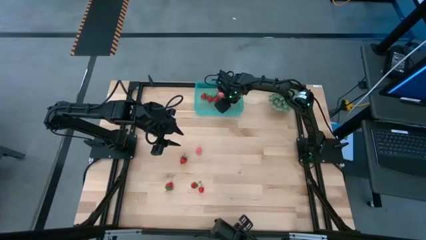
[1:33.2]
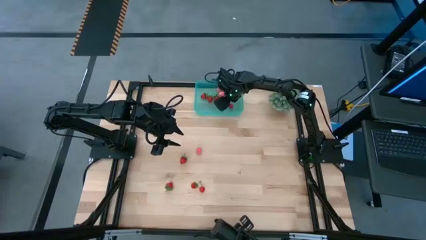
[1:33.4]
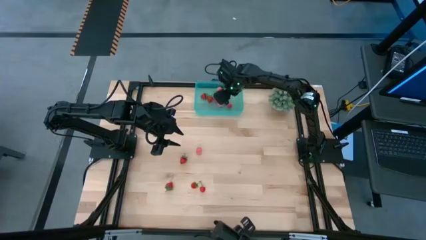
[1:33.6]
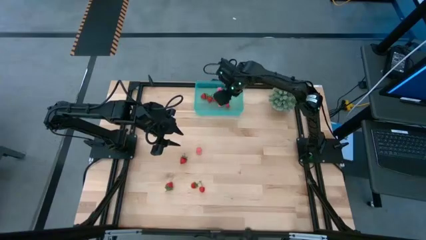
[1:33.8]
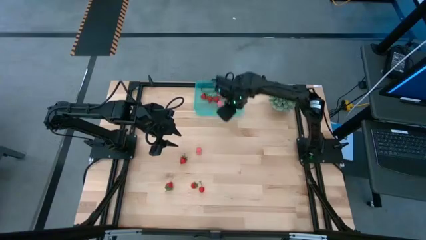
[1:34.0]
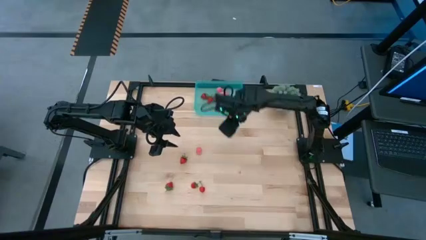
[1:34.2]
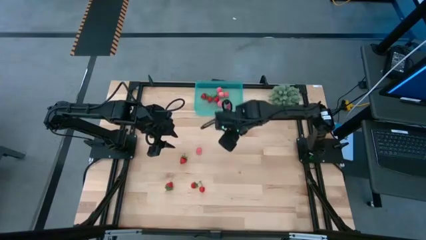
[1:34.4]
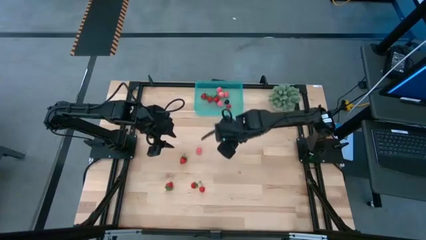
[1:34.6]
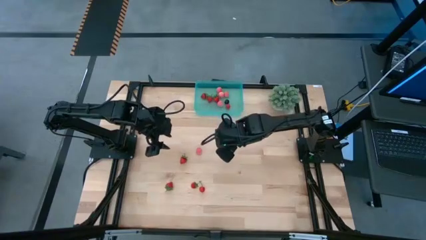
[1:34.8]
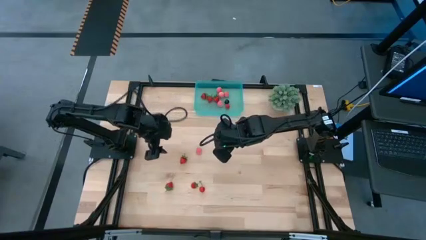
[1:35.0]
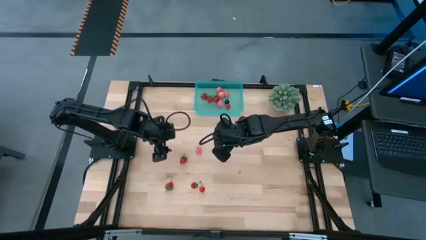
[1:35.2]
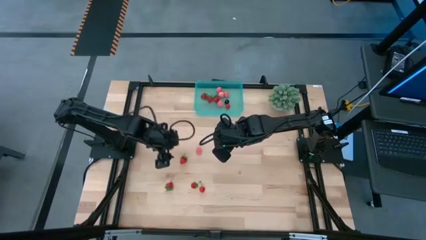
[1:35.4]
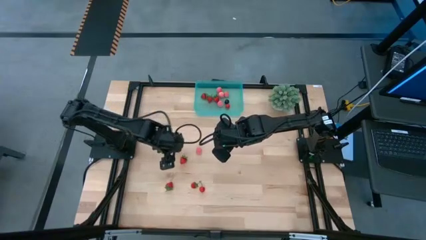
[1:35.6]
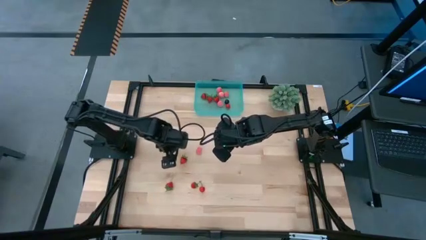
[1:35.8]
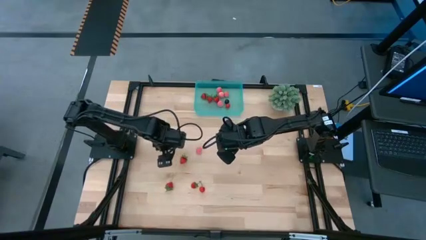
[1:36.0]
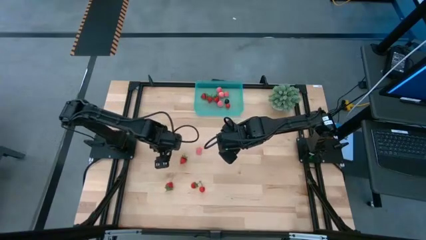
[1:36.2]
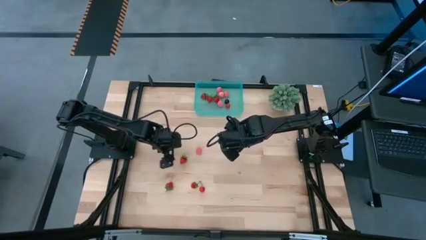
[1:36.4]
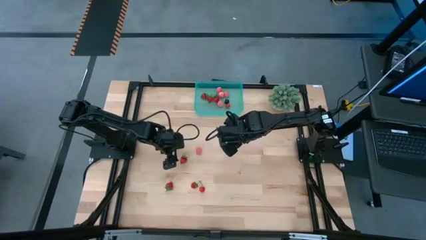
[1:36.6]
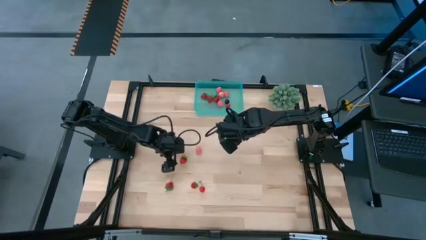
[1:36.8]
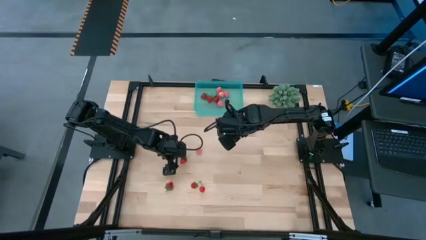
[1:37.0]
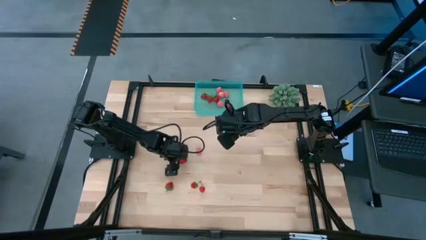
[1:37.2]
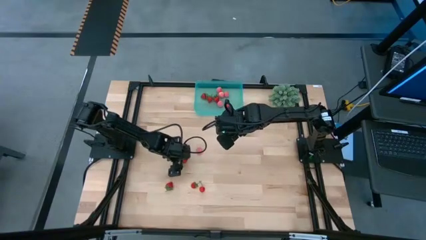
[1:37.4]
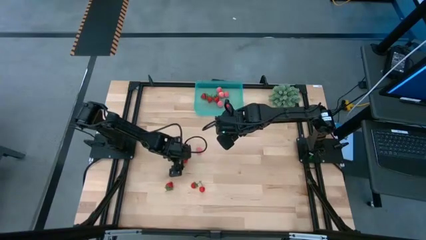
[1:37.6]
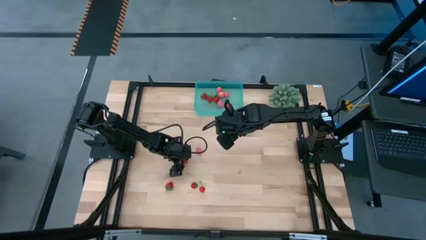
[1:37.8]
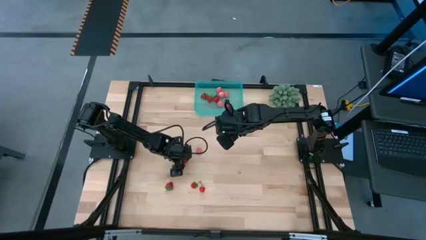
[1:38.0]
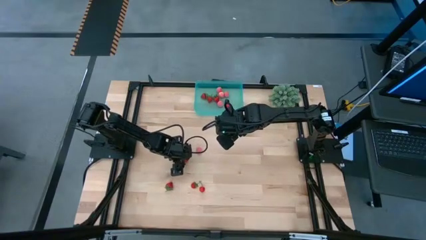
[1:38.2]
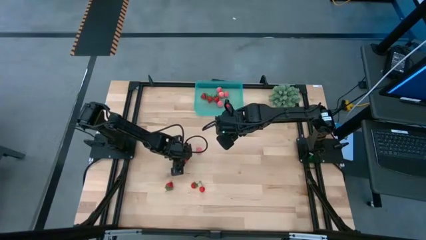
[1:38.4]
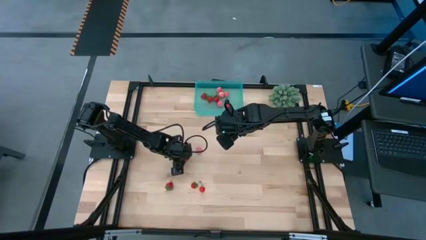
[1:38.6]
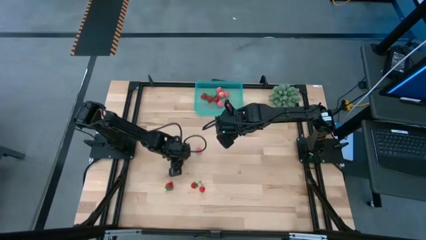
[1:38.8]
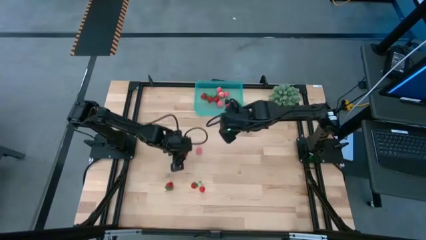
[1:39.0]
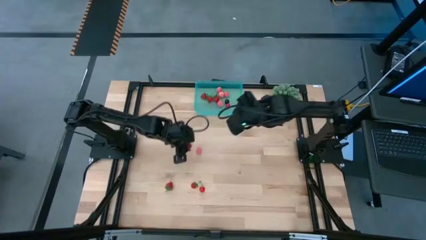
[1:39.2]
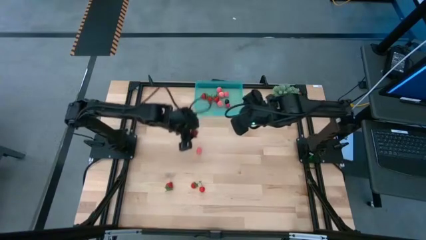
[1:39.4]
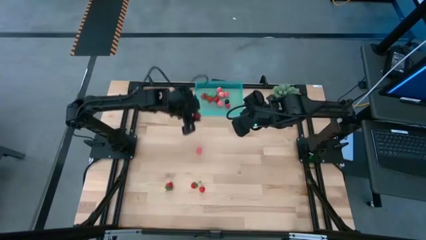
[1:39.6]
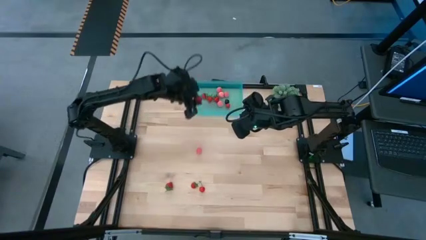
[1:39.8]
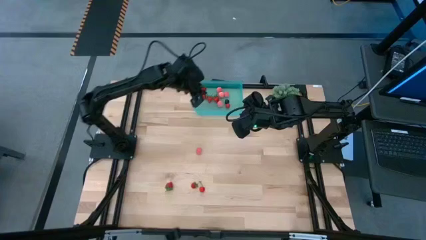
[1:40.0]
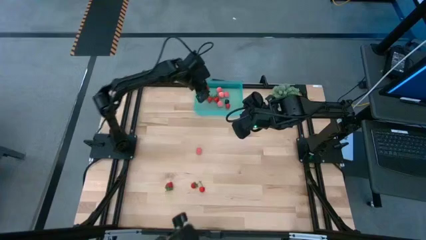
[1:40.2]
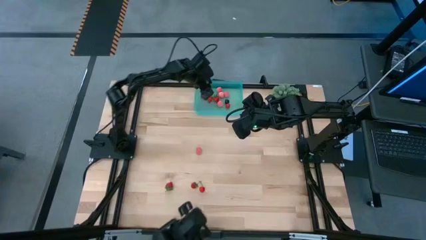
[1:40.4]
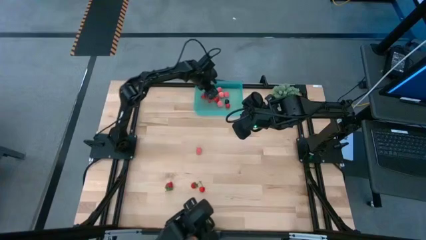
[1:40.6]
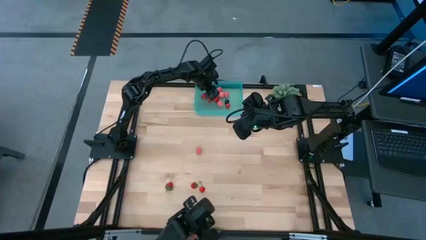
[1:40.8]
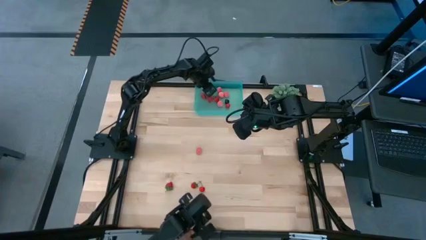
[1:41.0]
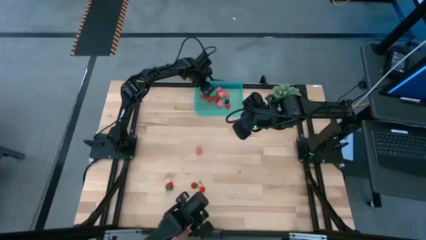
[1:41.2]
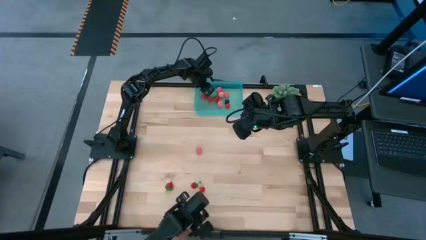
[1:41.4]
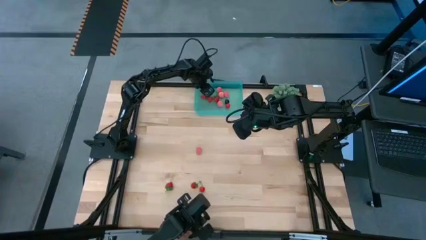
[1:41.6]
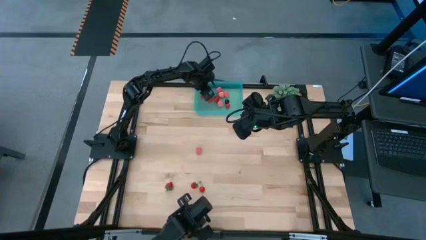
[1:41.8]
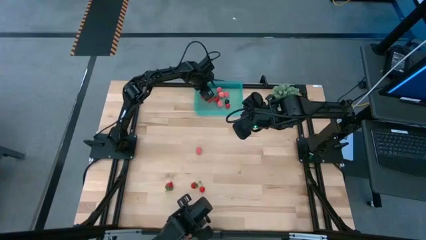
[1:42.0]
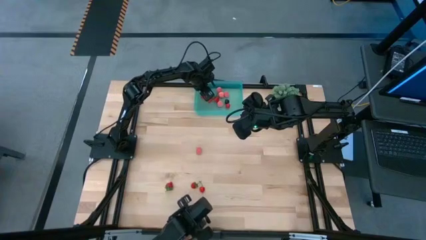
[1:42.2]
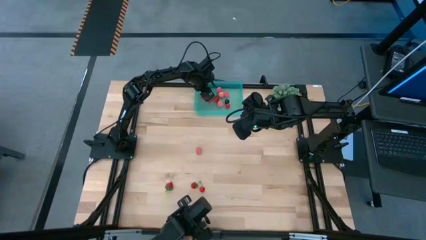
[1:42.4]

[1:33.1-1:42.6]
Task: Pick and placing Produce into tupperware
Put the strawberry into the blue basket

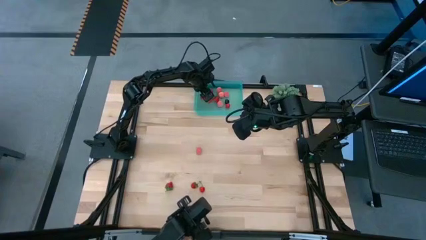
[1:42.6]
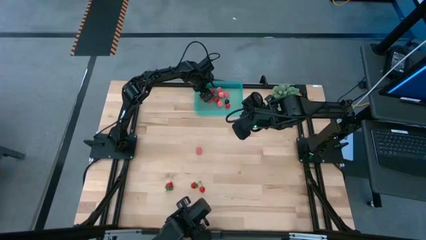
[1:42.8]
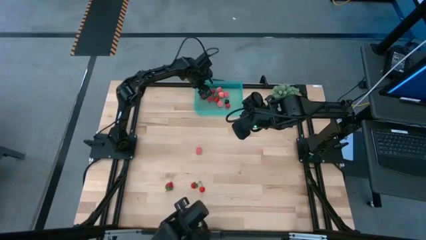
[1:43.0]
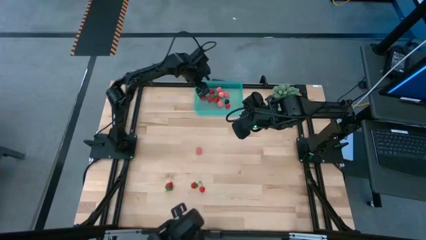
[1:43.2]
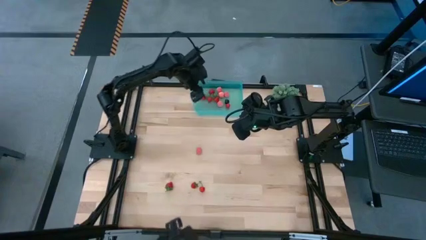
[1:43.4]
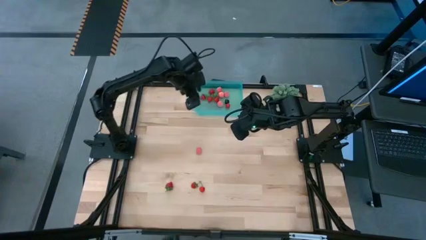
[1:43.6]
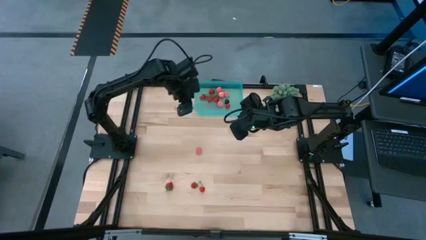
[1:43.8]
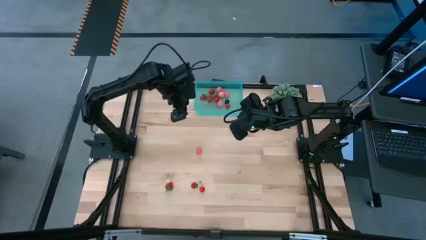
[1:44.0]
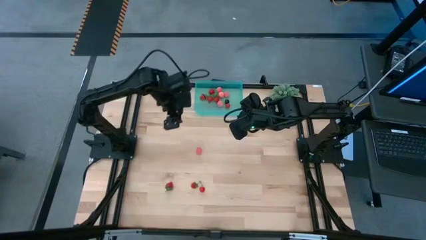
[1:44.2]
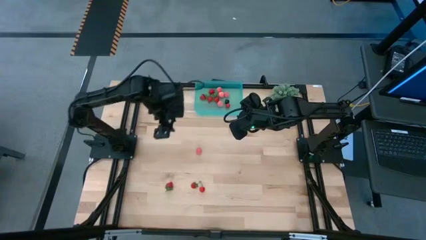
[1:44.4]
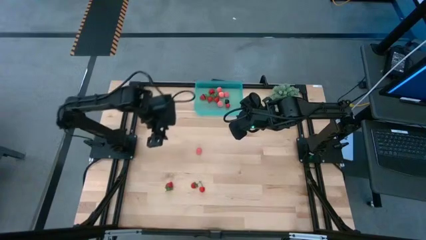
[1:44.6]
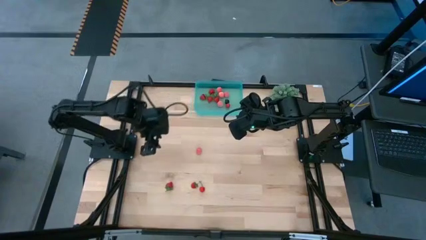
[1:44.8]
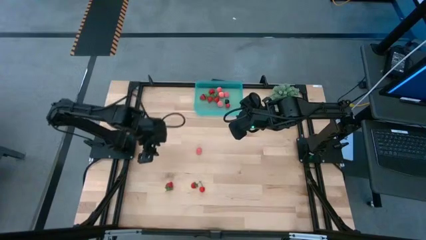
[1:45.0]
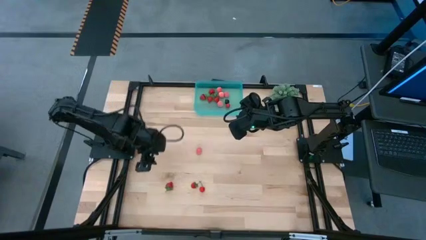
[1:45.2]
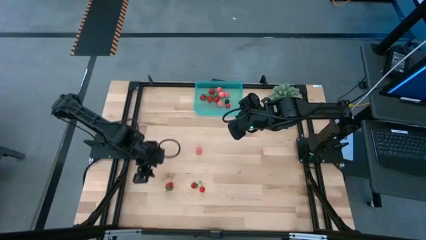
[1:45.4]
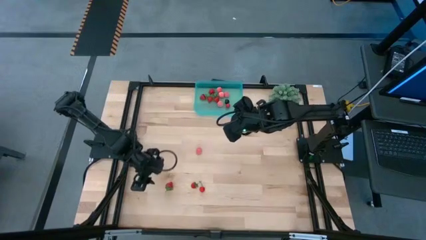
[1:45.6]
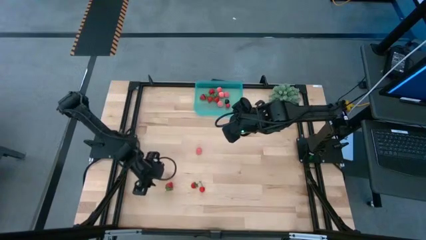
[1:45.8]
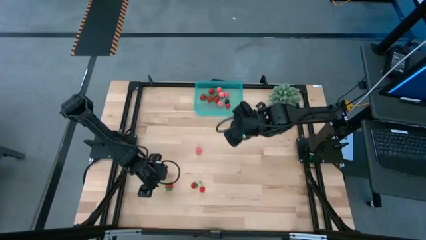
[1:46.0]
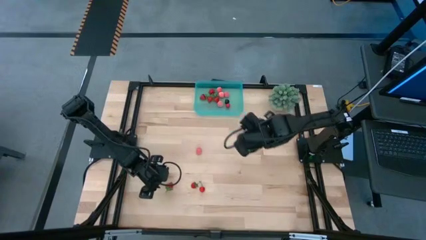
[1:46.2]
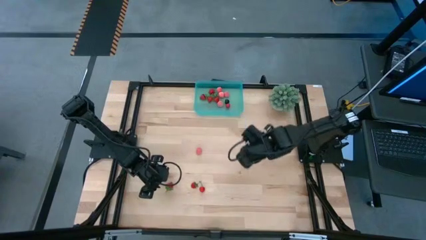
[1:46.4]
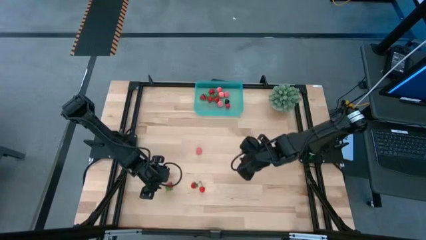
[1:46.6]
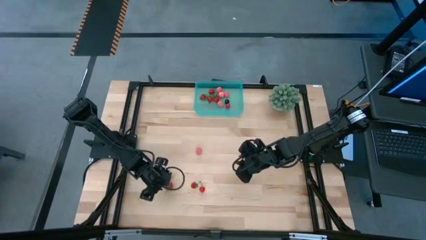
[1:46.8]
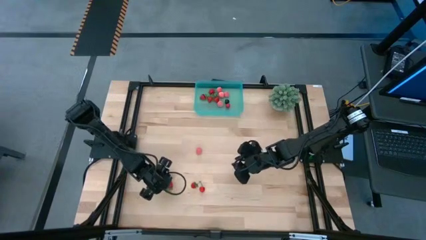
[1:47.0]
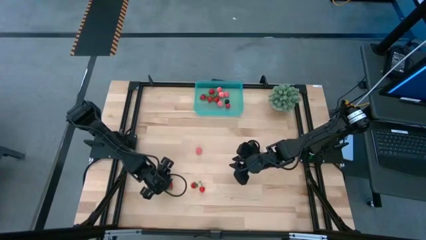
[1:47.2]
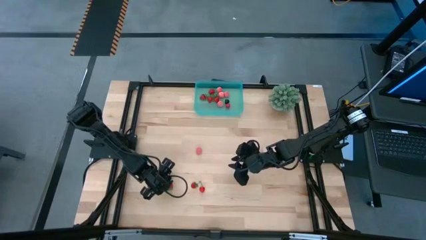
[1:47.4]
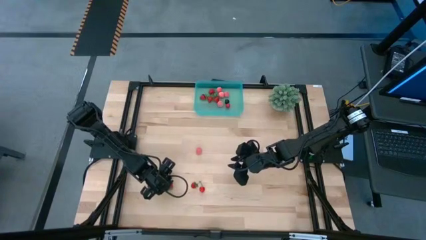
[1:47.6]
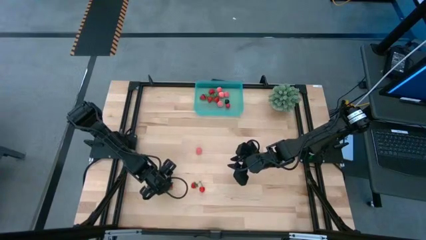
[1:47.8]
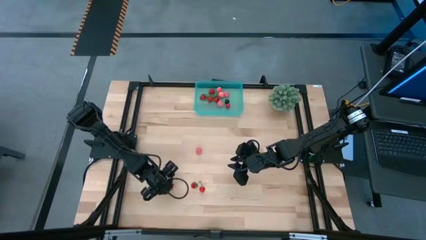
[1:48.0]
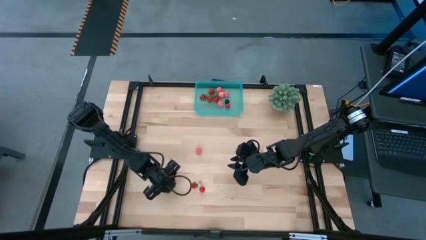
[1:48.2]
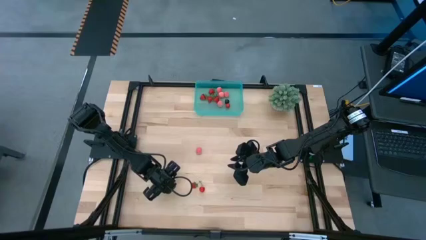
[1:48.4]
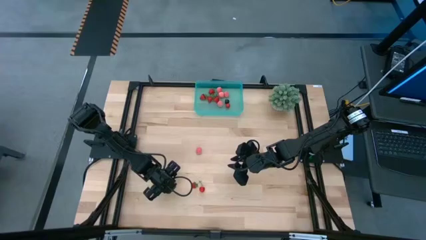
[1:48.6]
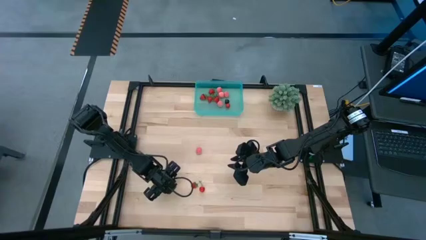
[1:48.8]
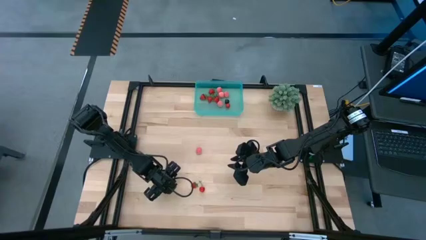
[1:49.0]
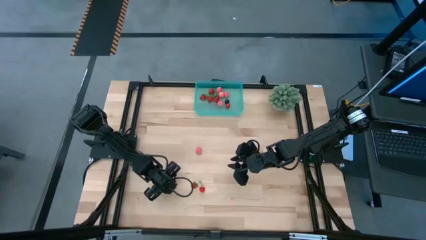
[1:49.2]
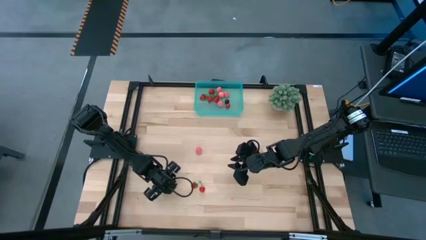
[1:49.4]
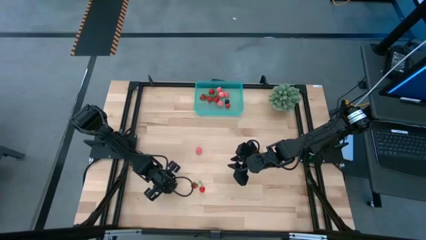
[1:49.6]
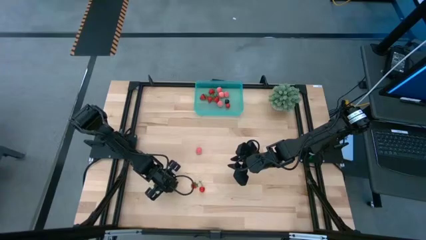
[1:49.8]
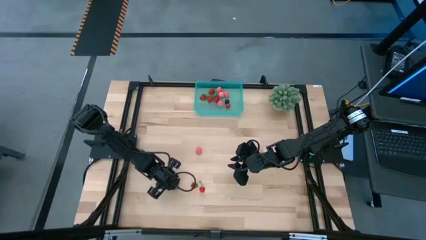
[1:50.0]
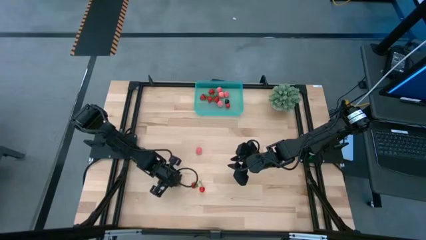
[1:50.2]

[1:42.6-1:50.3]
Put the strawberry into the blue basket
